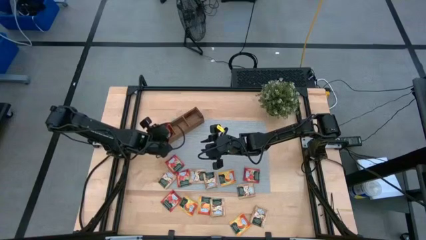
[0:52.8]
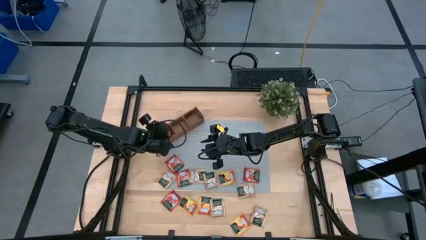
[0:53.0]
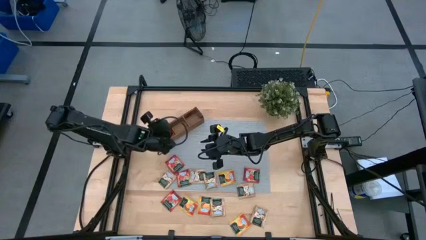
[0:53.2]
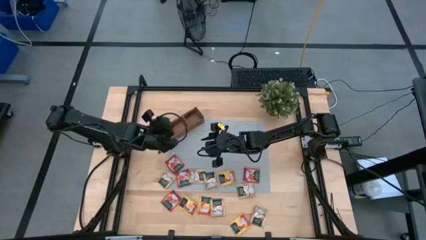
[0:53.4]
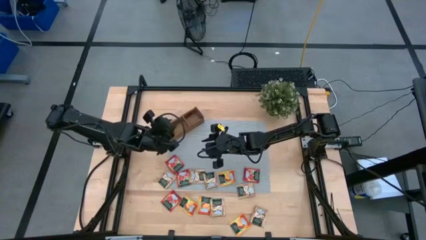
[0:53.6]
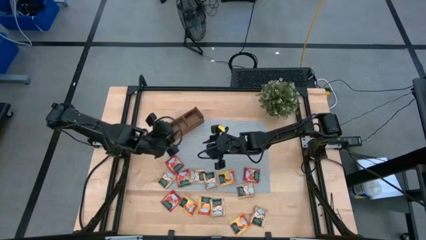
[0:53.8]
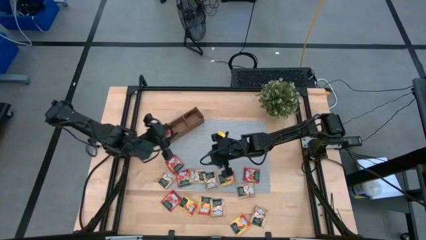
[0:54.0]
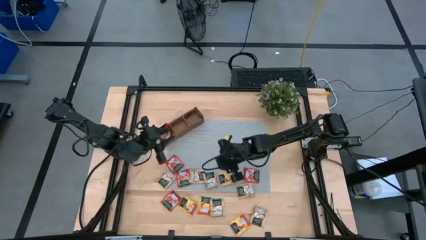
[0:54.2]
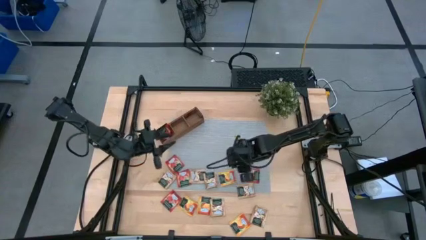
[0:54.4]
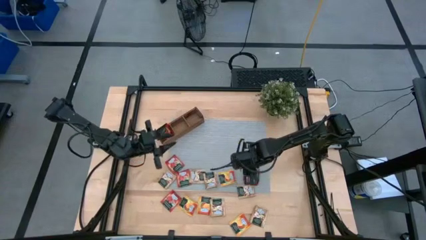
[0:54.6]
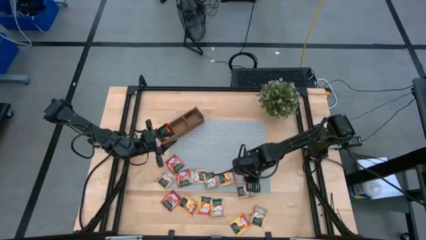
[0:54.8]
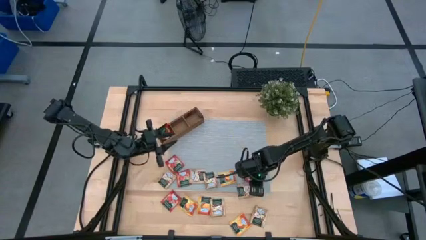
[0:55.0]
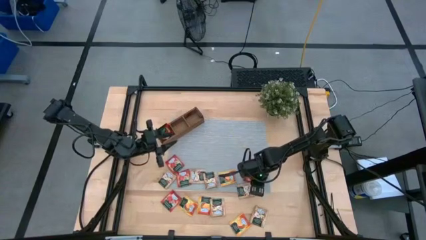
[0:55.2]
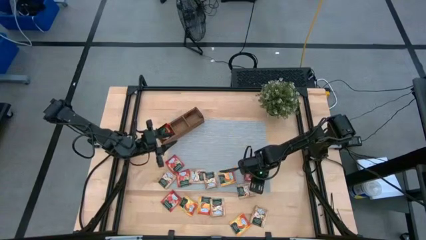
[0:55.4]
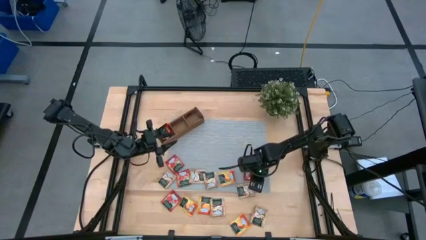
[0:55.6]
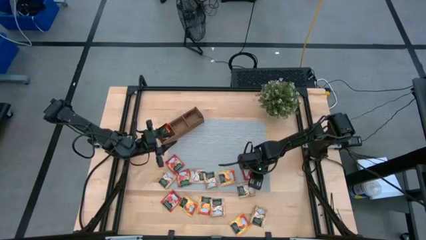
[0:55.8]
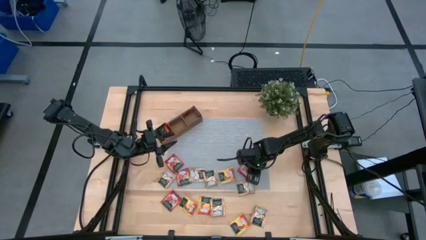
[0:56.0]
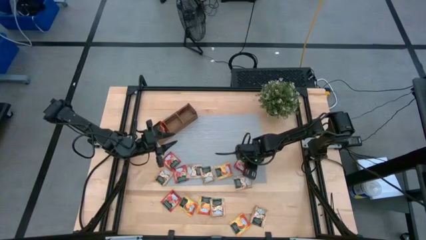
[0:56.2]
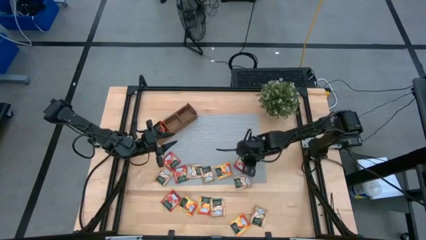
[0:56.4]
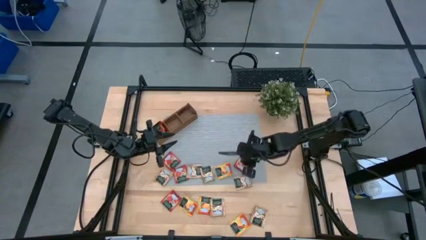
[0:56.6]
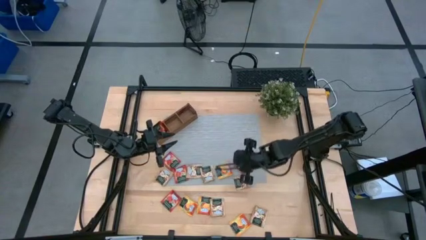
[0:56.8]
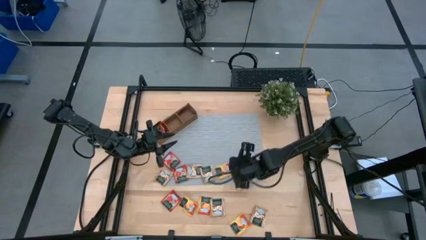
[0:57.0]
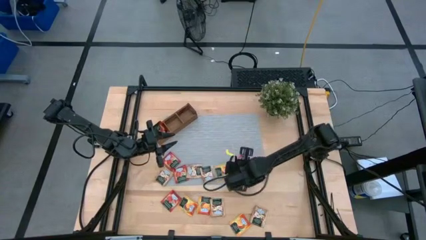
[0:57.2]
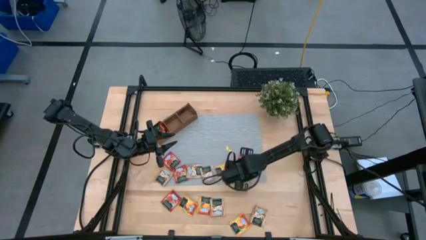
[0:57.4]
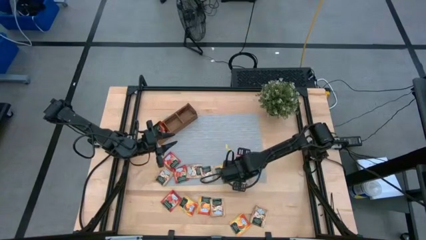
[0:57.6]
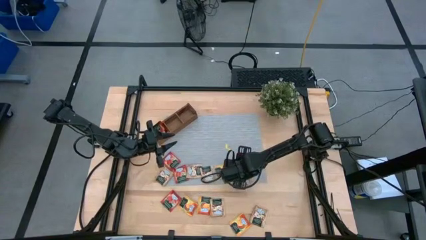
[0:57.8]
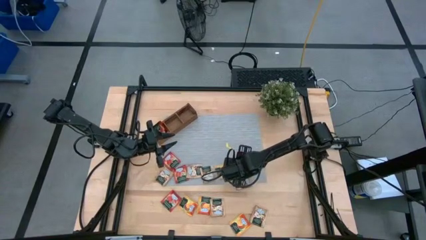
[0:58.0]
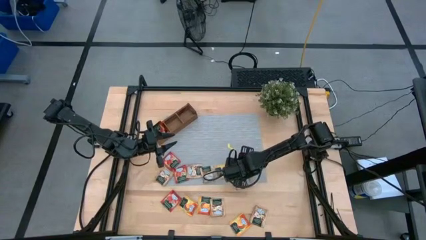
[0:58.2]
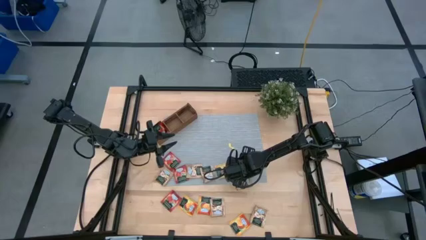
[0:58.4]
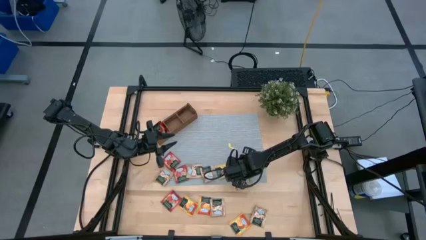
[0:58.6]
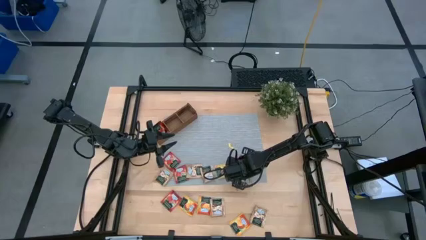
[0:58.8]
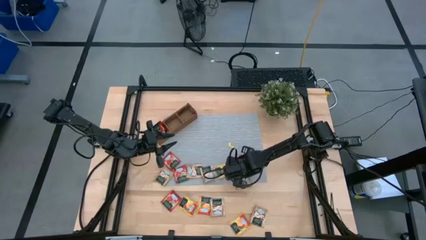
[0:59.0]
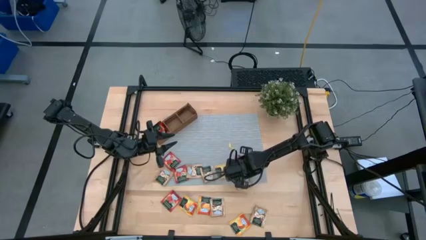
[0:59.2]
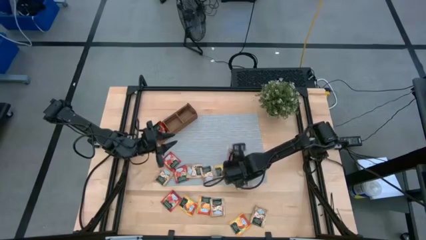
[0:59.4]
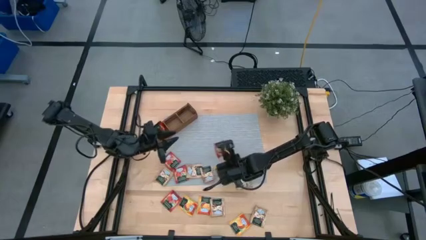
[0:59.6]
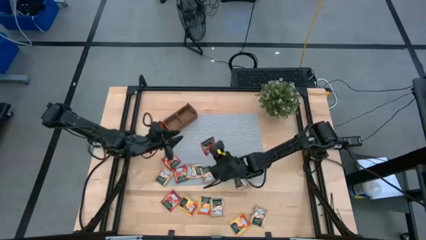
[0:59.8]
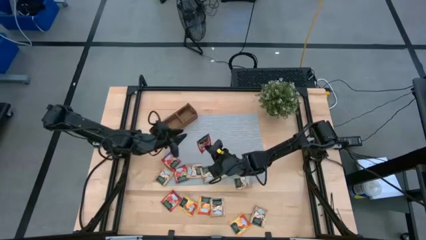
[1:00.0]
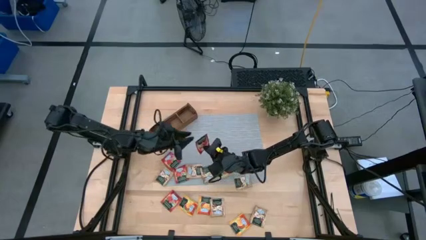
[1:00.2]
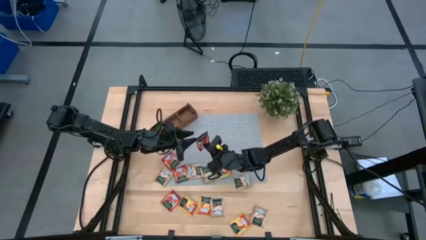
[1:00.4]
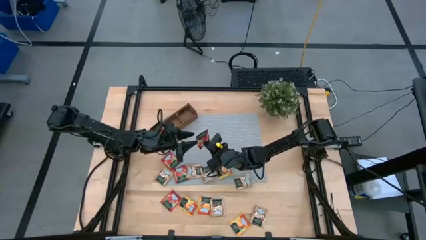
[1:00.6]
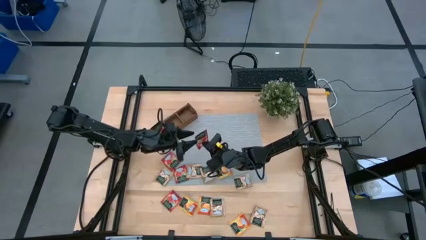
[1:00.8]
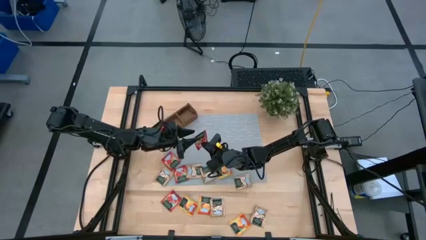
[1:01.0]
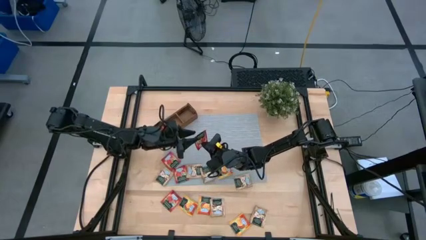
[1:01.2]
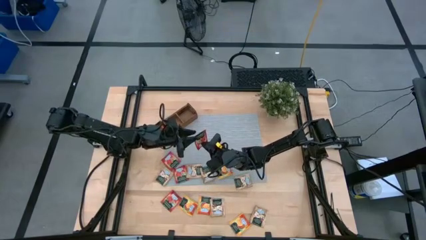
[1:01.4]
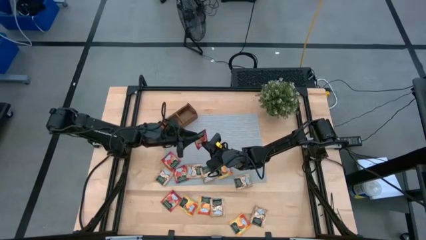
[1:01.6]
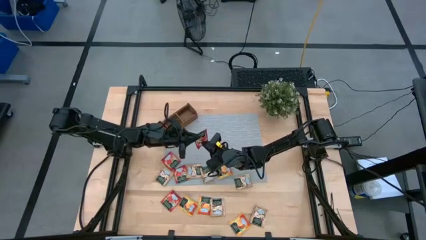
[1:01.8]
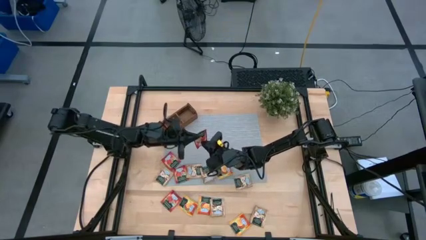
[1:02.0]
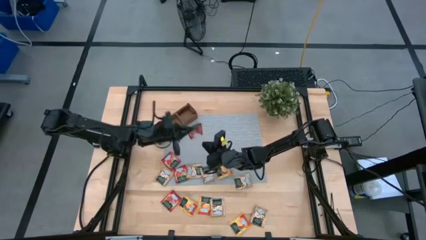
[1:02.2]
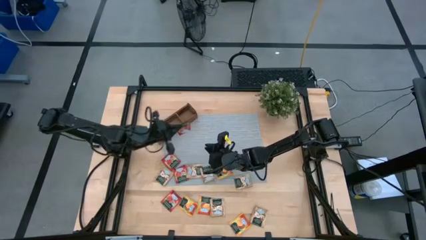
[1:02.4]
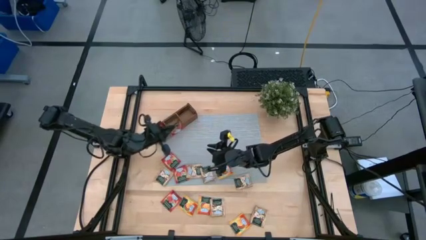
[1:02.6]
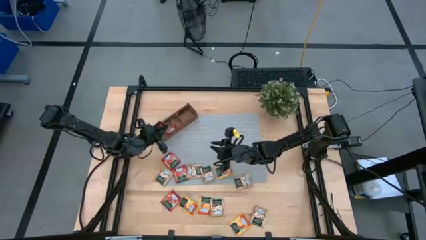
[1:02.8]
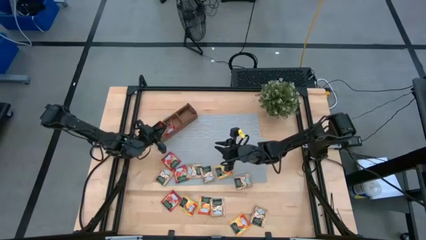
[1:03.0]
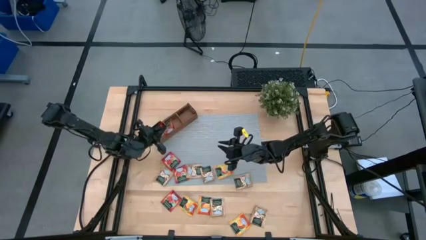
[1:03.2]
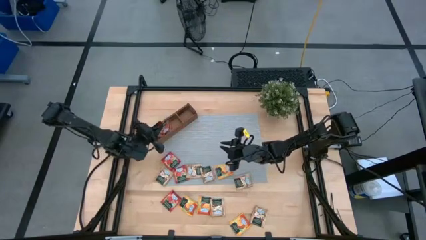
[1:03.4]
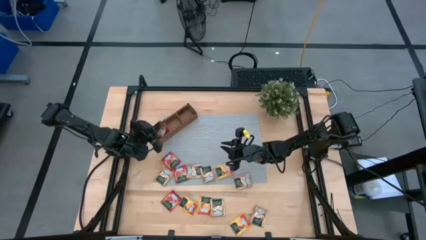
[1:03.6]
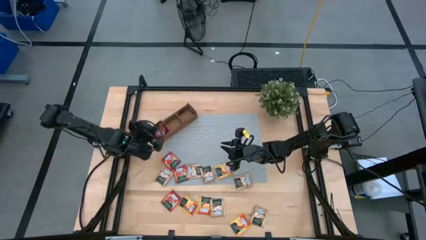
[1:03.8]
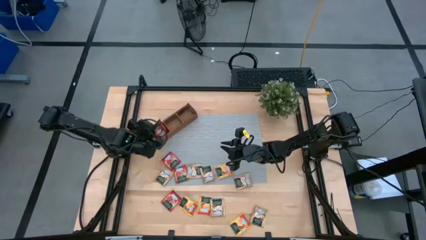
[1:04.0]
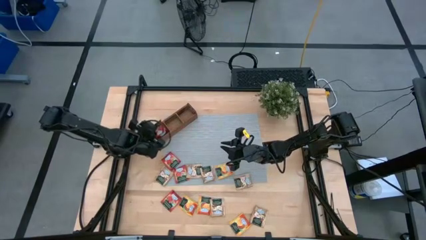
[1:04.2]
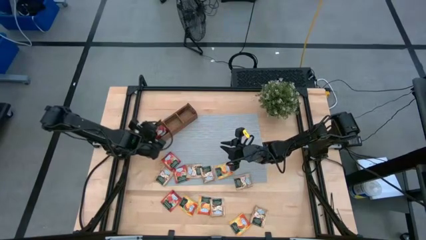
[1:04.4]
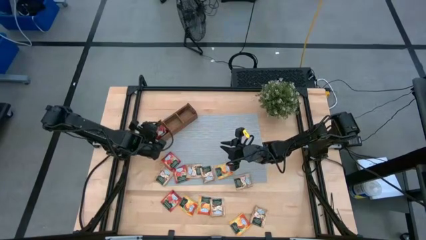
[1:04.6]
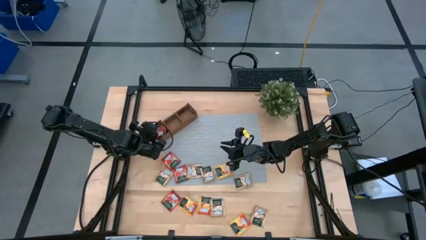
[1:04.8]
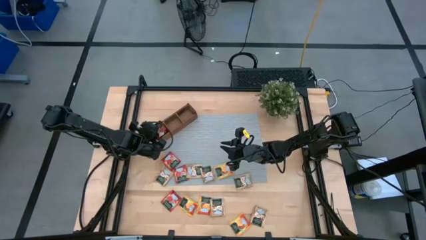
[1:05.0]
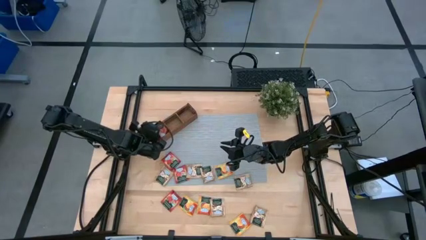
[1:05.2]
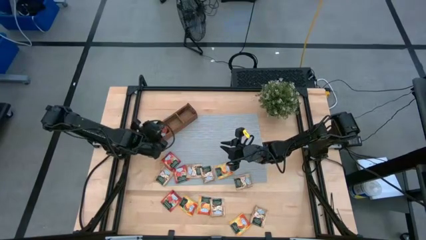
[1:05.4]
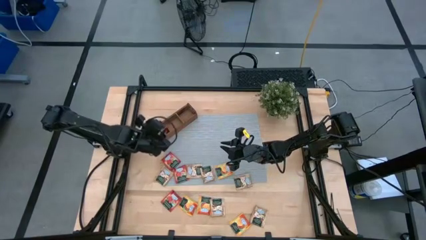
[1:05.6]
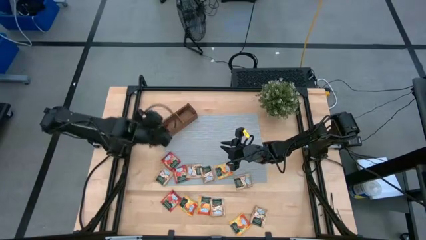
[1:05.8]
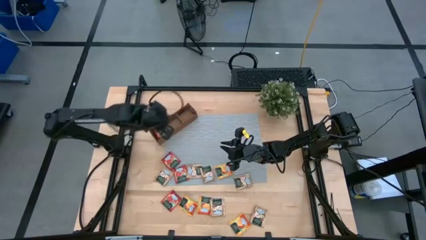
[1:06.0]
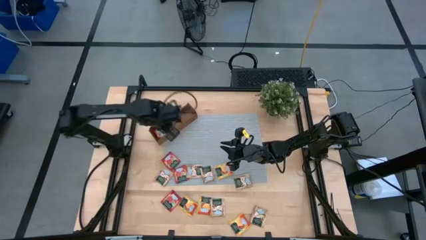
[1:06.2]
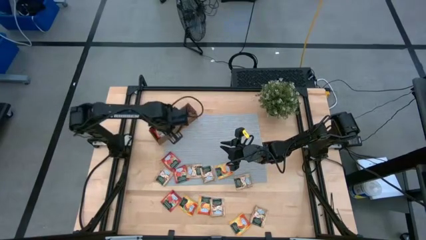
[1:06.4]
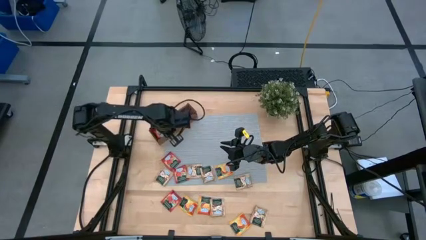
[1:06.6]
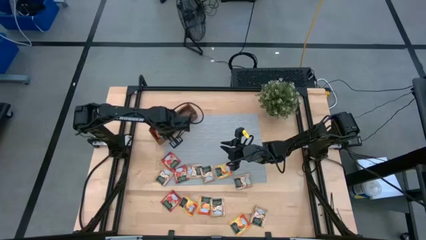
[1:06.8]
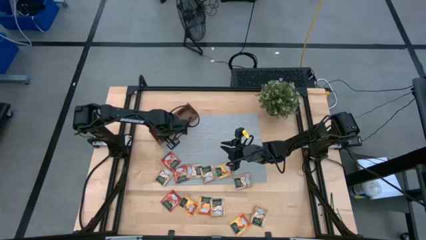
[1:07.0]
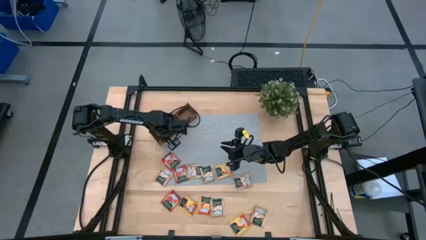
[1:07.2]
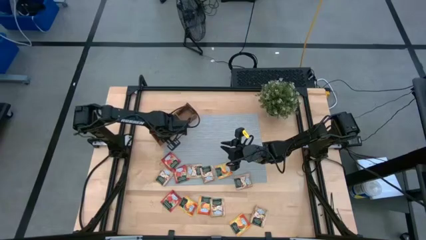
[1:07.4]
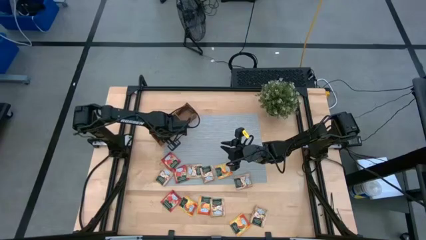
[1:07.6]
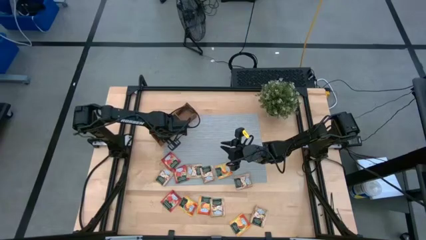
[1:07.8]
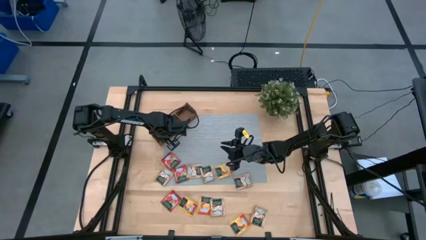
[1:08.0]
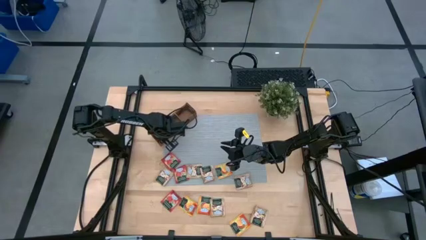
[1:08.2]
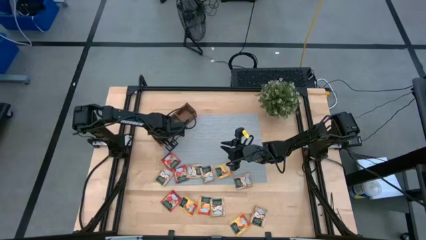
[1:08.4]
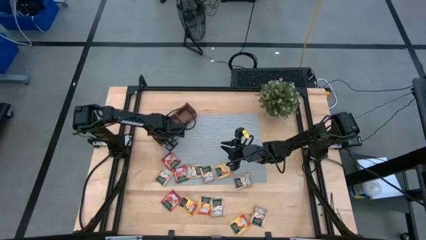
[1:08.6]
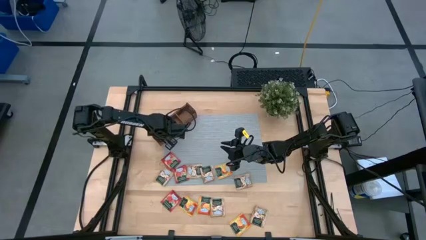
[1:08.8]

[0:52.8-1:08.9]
Task: Pick & Place Tea
Put the red tea bag into the left section of the wooden organizer
